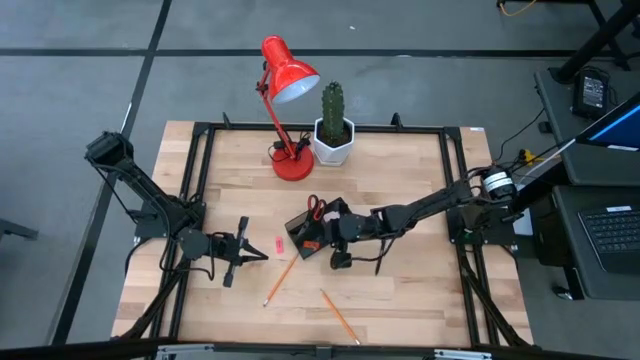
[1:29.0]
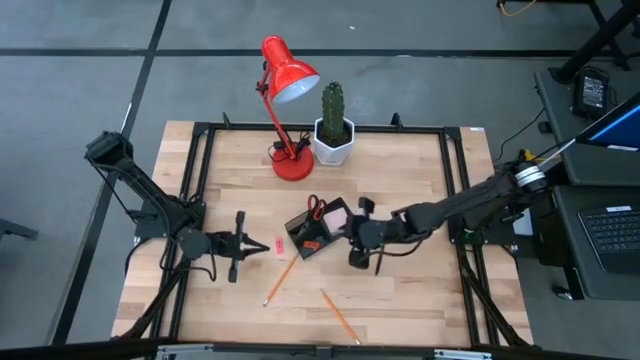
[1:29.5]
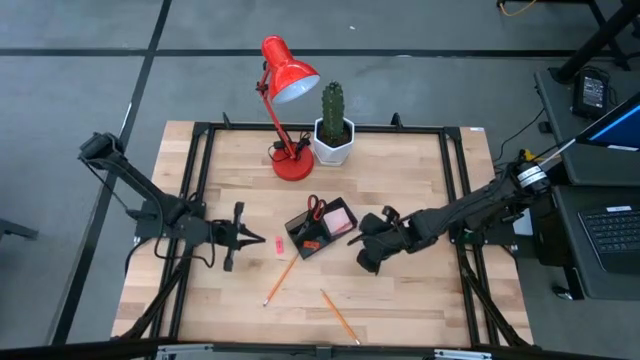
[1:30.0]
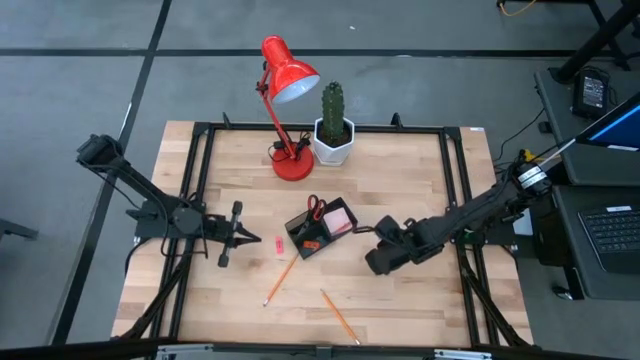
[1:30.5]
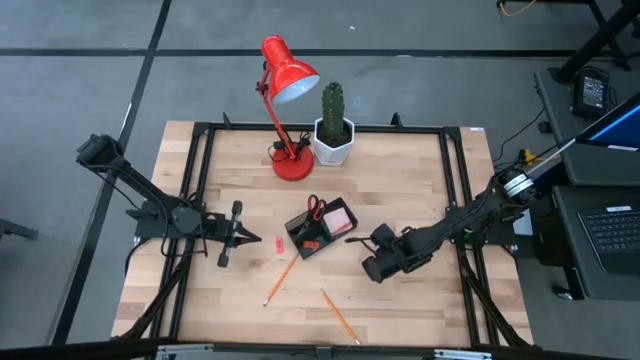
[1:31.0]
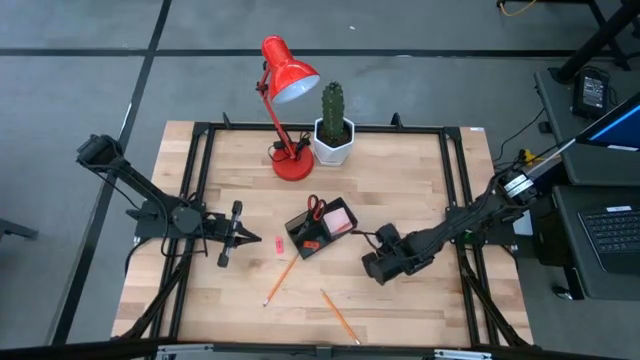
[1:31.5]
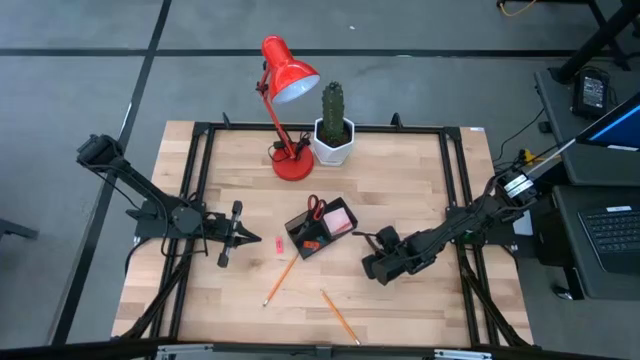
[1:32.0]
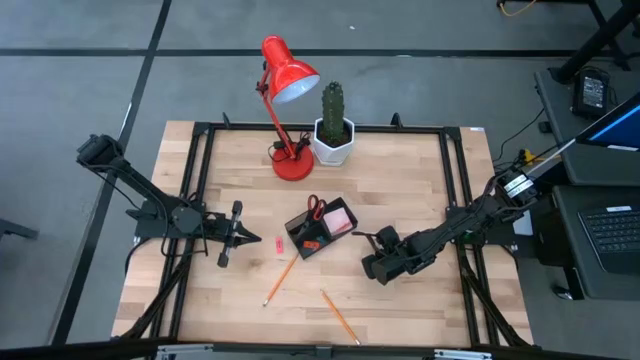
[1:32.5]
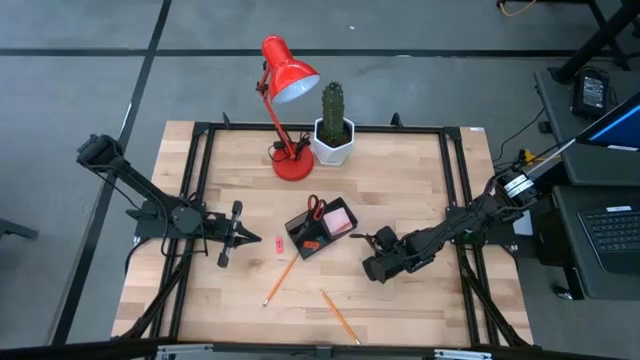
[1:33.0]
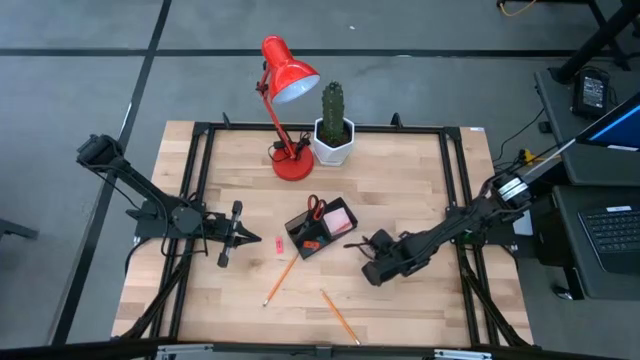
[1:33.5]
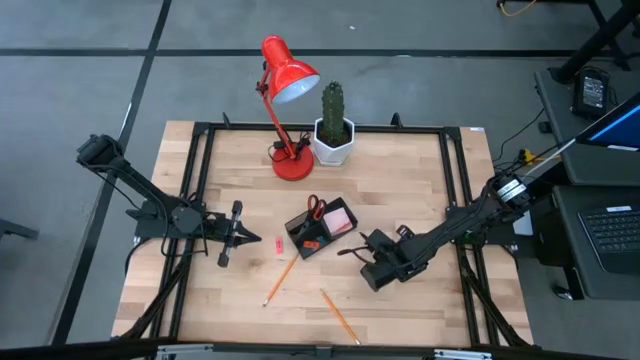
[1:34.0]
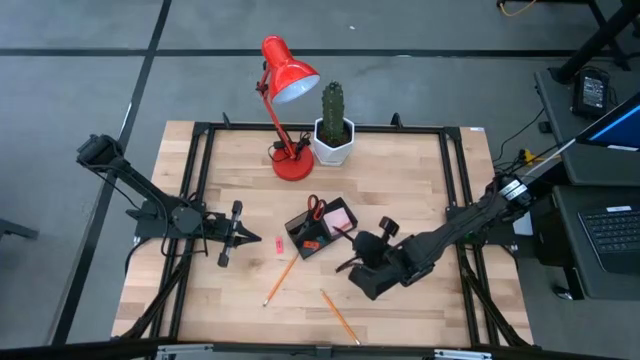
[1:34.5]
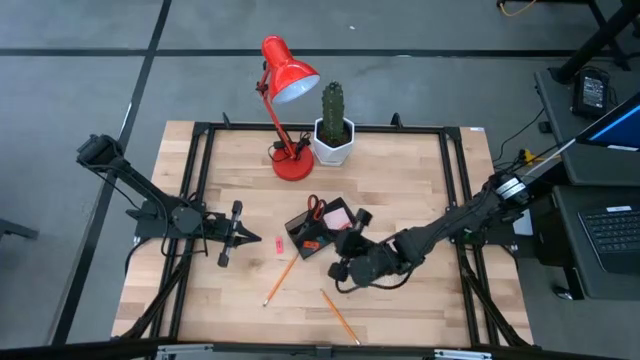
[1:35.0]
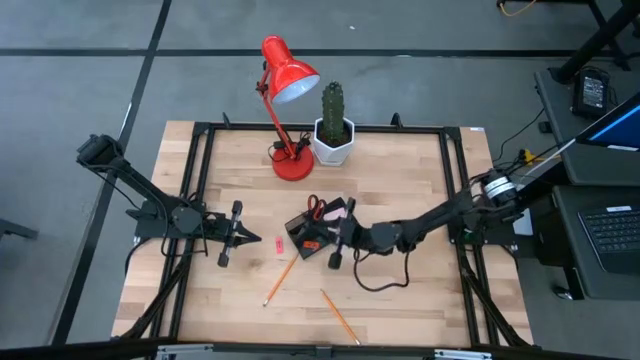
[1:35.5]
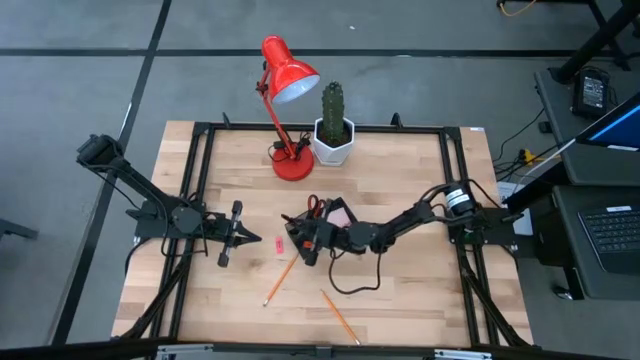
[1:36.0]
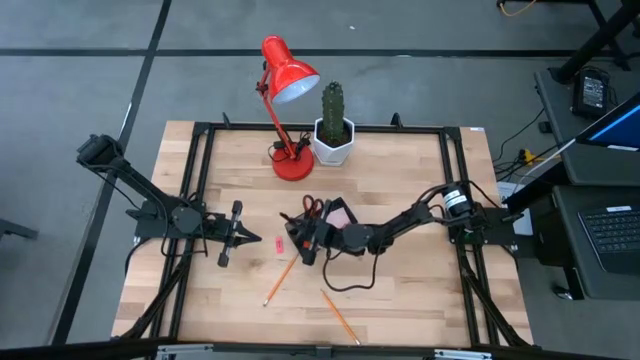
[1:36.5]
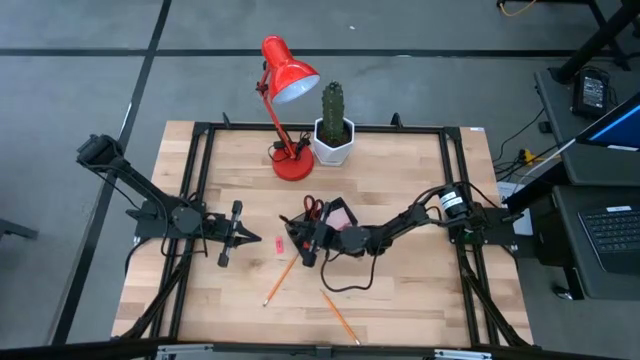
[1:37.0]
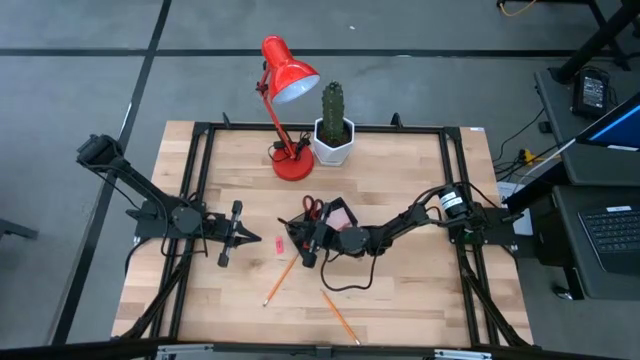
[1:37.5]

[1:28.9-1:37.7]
Task: Pick and place office supplies into organizer
Put the black pen into the black desk organizer

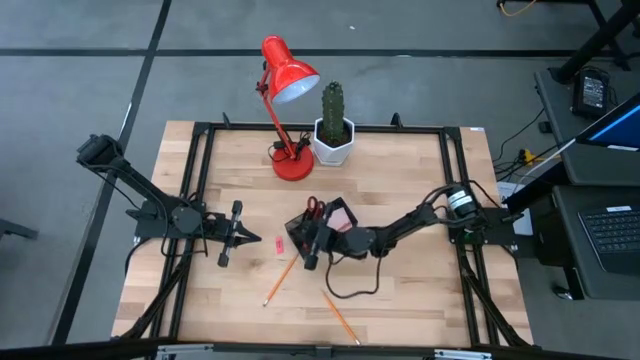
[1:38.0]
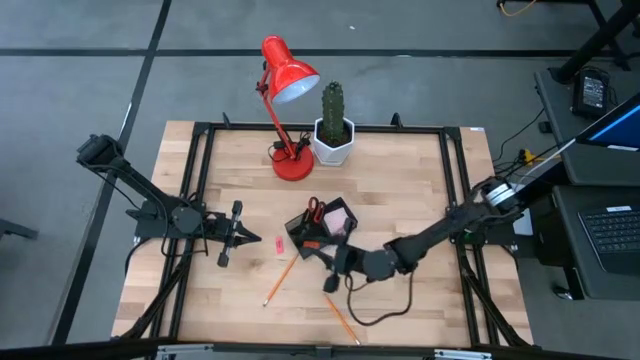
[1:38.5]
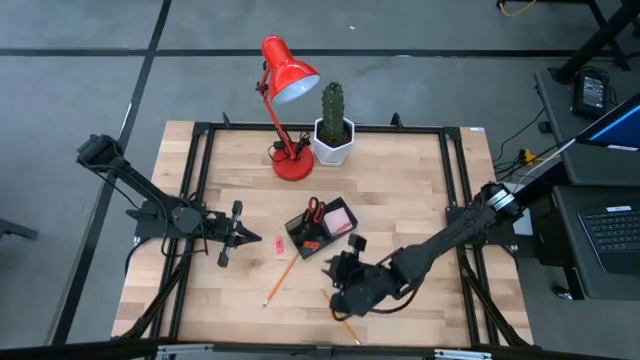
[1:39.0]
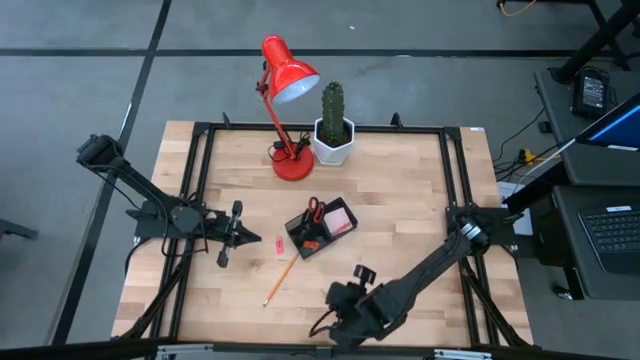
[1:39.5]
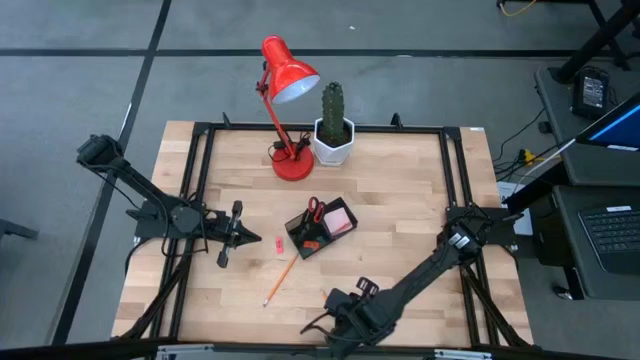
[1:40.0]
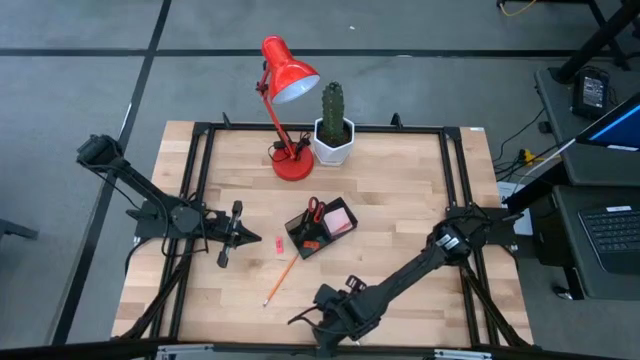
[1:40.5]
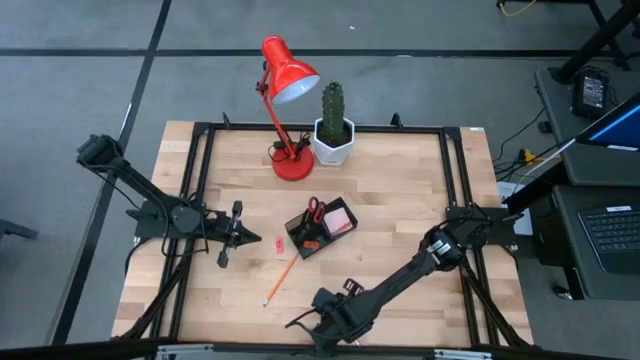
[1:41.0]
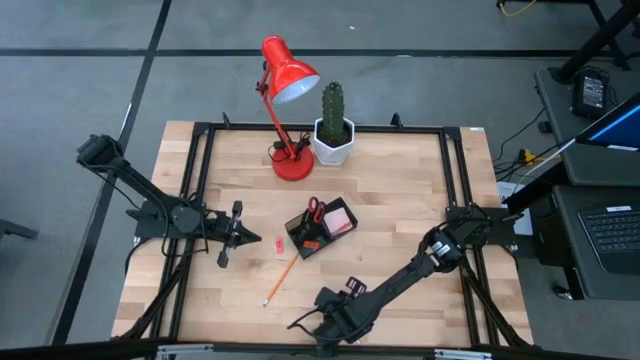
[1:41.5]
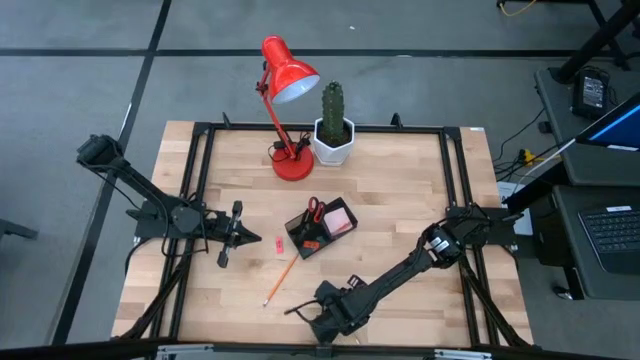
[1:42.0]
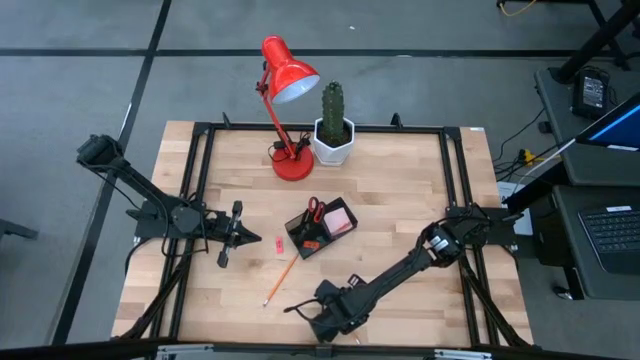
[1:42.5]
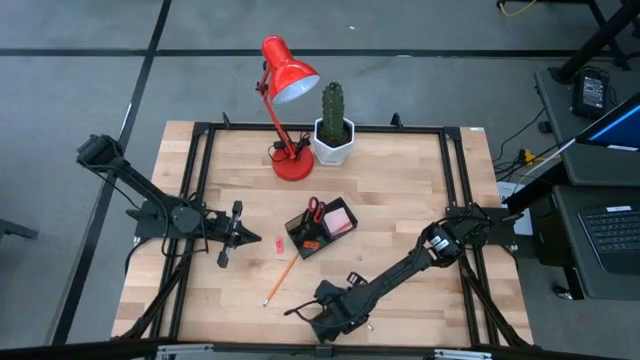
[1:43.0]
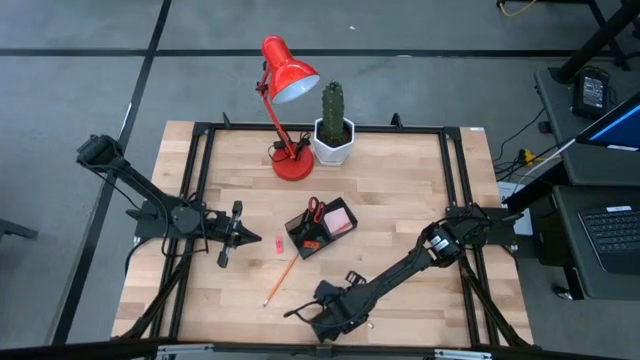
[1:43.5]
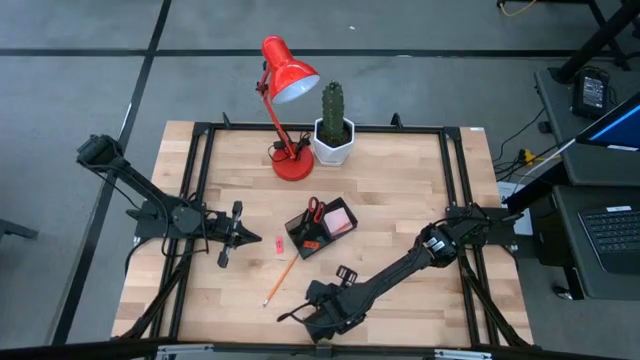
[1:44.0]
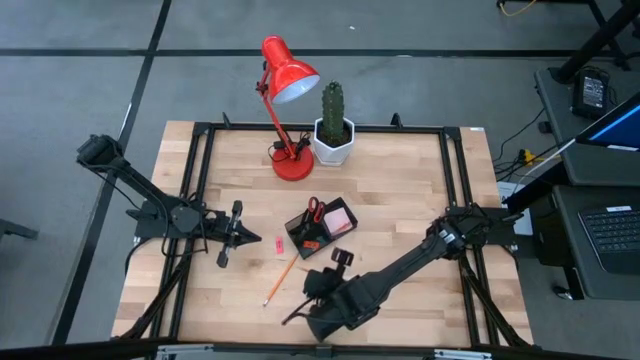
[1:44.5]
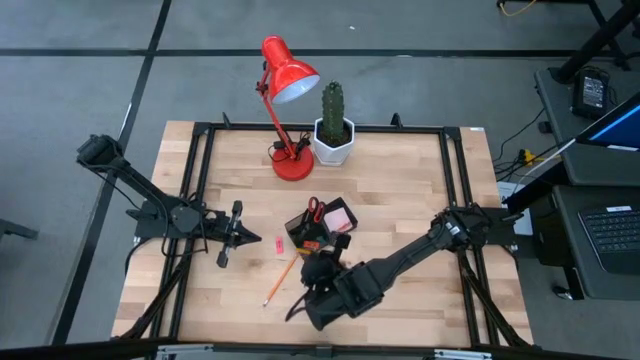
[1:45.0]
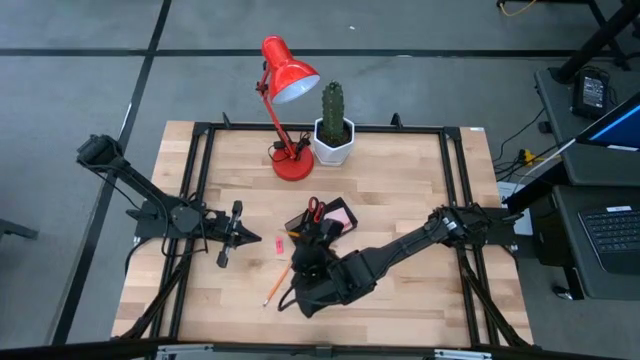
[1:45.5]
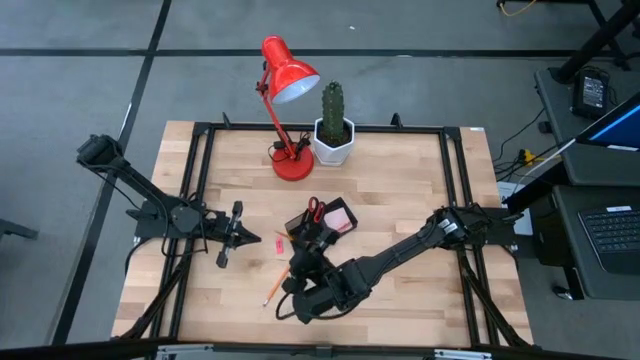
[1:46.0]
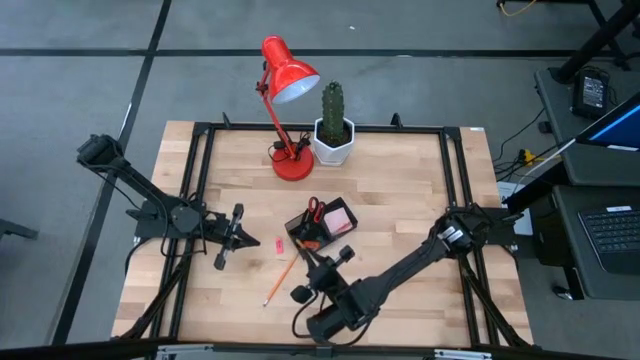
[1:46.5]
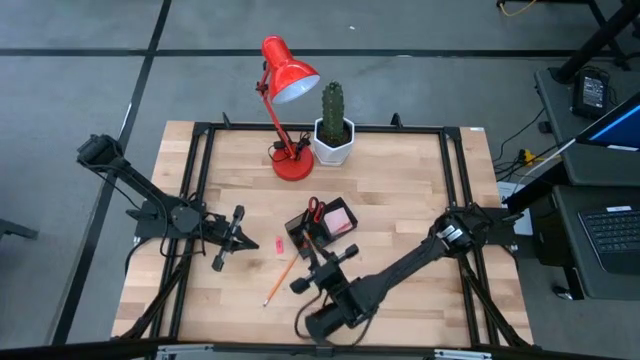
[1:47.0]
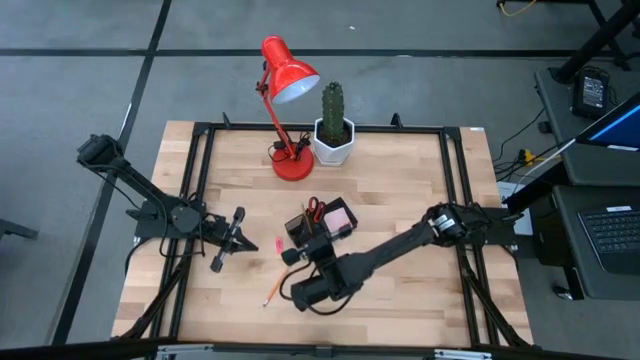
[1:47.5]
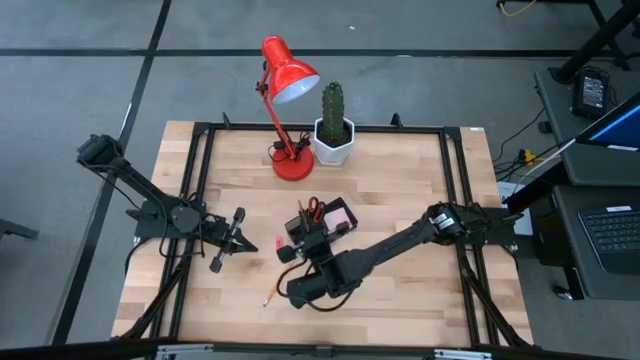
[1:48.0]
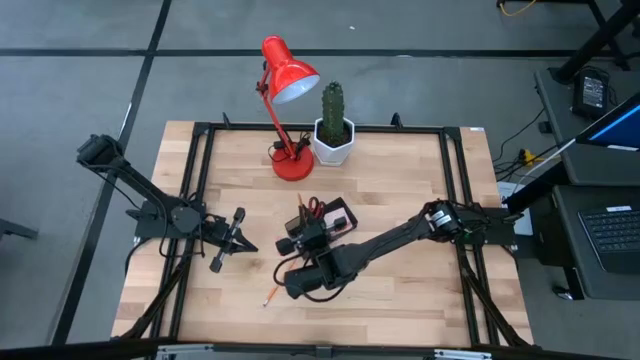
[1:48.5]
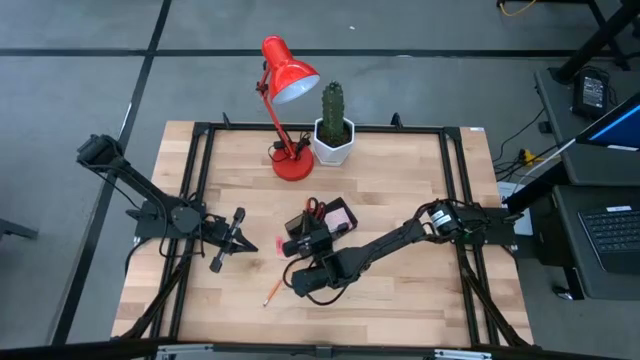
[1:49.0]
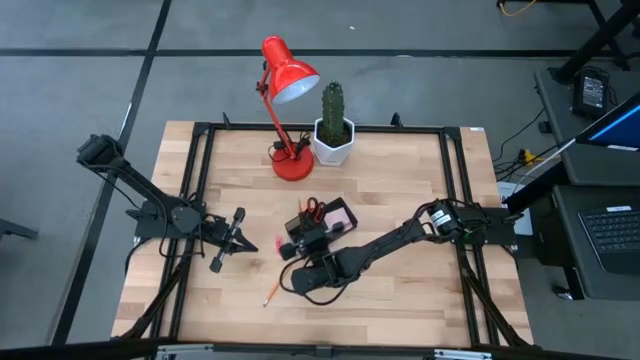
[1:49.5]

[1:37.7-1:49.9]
Put the right orange pencil into the black desk organizer
